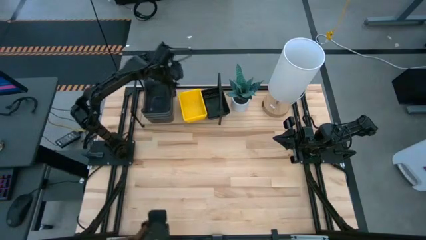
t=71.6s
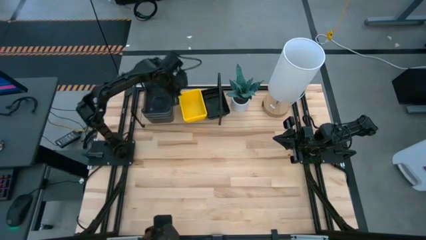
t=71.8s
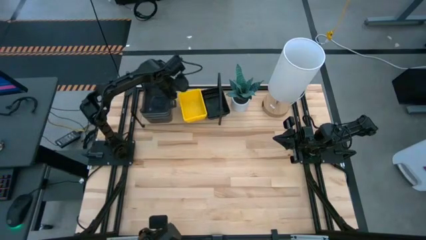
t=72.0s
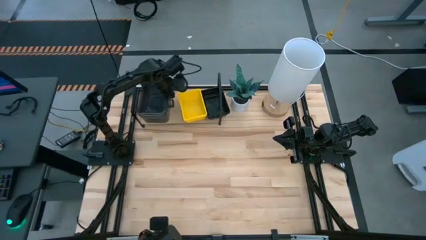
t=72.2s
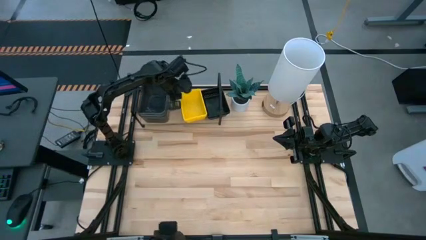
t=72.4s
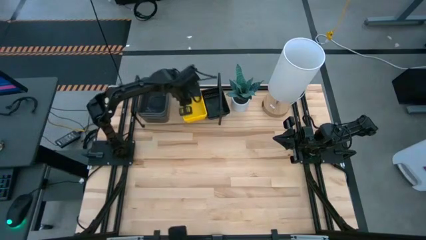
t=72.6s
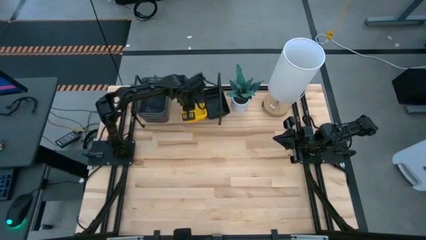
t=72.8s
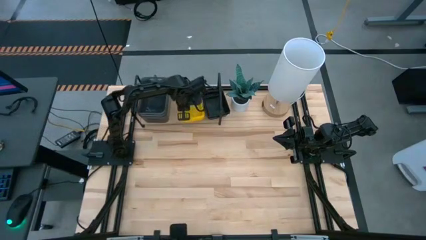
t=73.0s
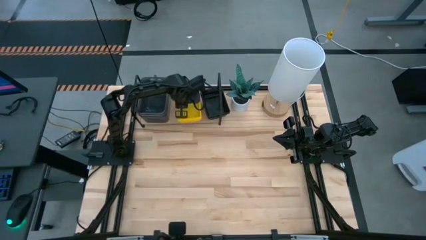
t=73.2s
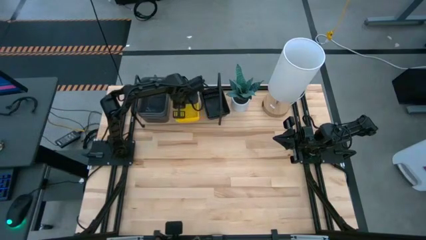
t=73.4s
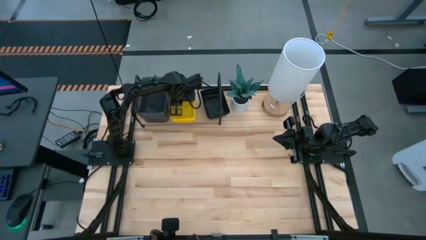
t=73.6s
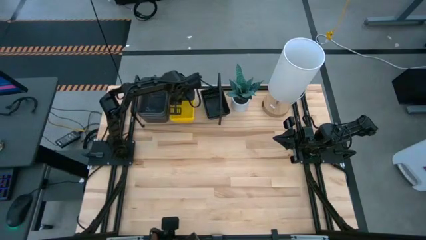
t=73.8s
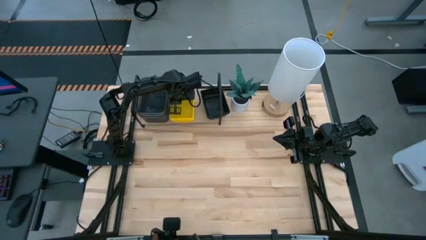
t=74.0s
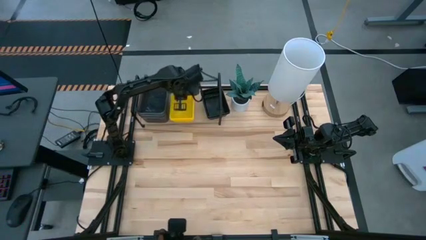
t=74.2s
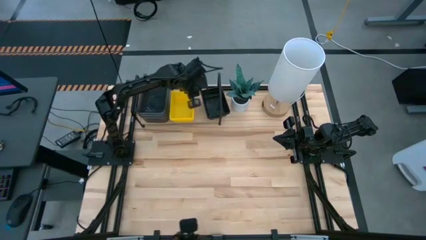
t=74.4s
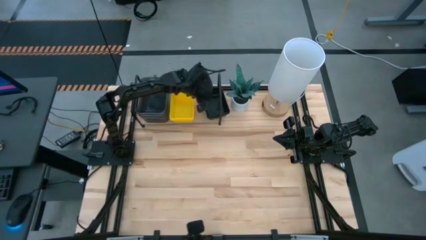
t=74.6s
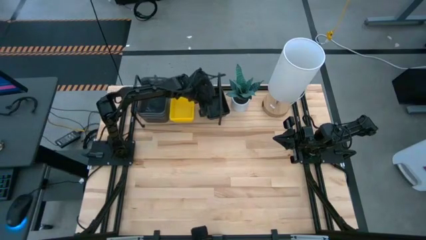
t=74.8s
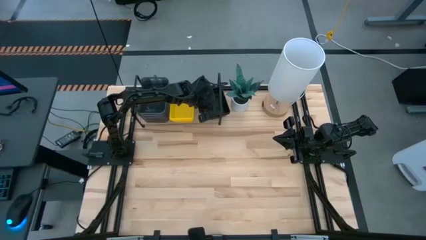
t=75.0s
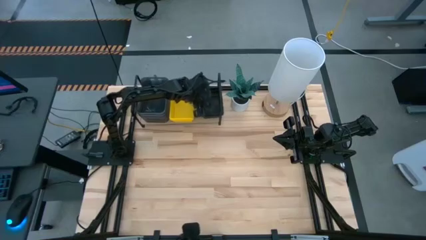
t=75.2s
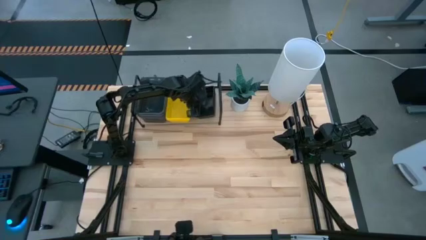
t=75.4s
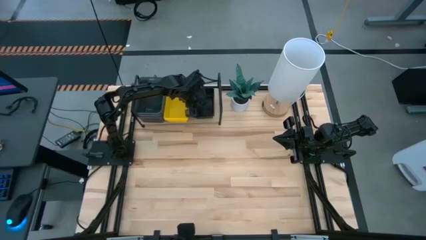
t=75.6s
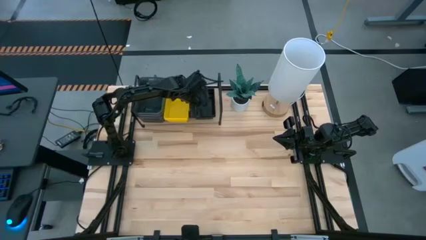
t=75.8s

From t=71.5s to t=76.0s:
Task: Stack baskets on shelf by color
Adjust the bins on the shelf

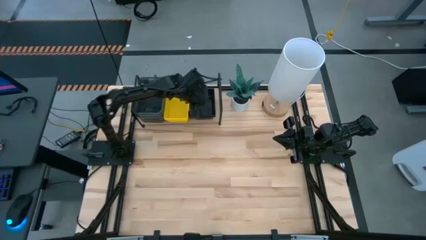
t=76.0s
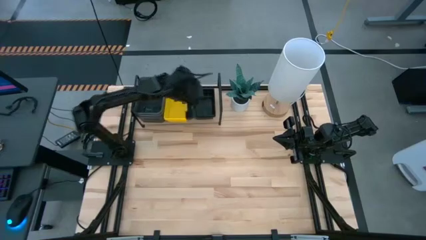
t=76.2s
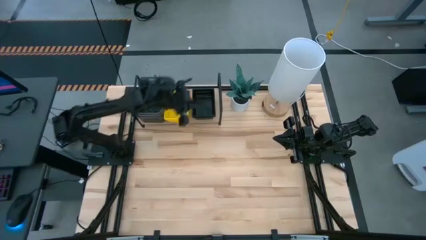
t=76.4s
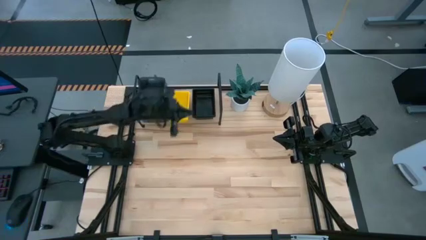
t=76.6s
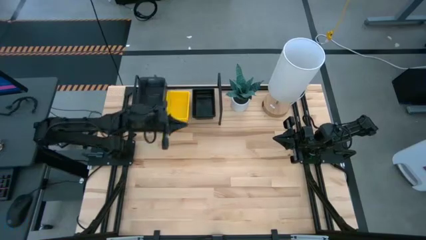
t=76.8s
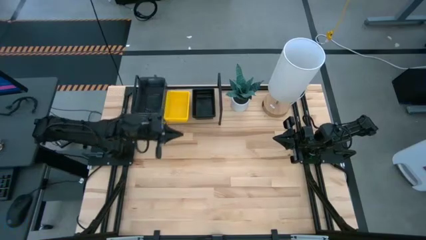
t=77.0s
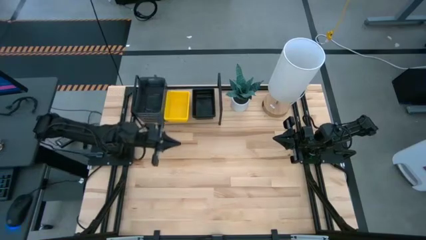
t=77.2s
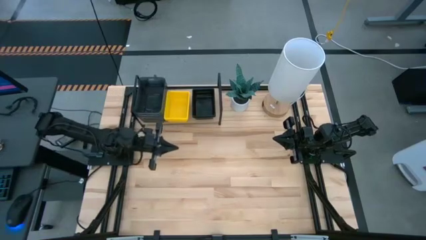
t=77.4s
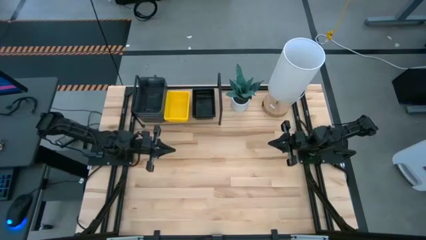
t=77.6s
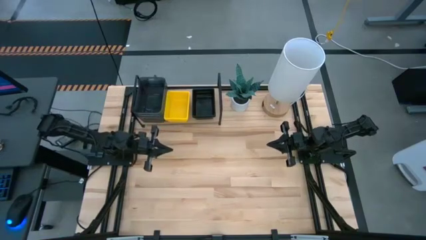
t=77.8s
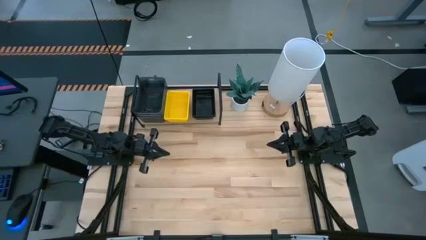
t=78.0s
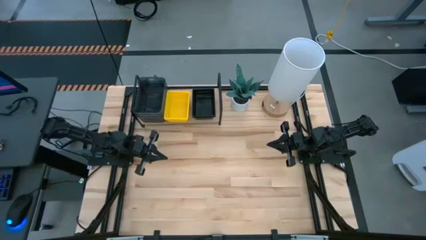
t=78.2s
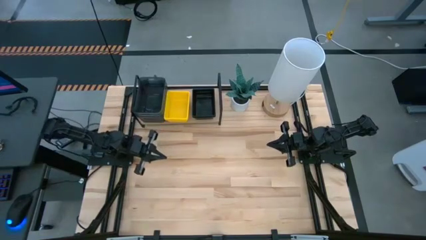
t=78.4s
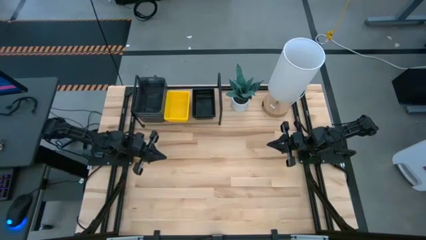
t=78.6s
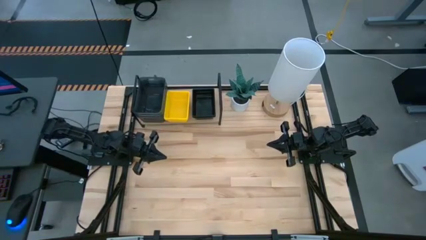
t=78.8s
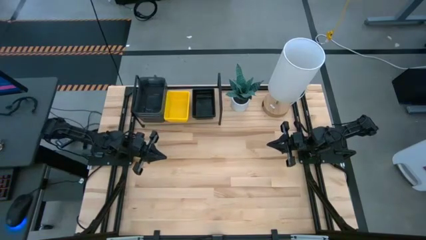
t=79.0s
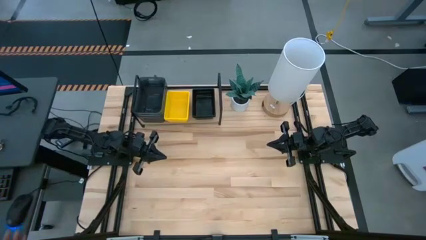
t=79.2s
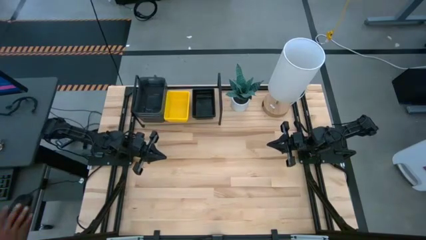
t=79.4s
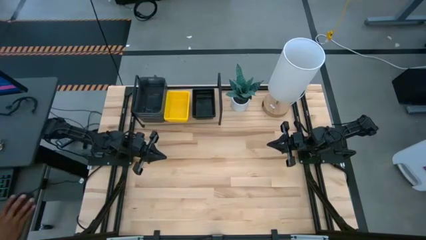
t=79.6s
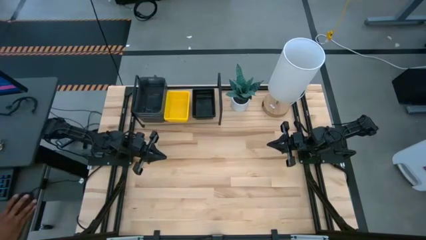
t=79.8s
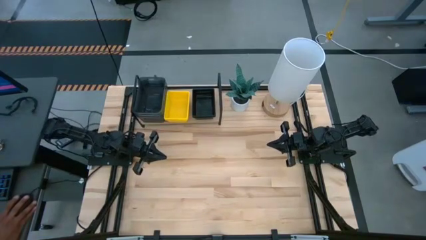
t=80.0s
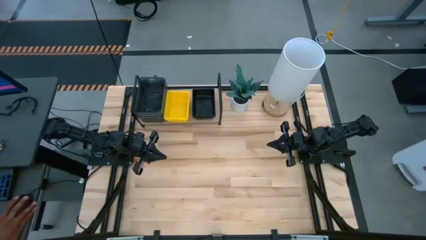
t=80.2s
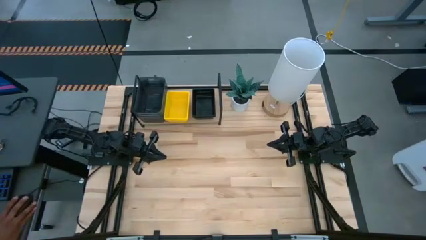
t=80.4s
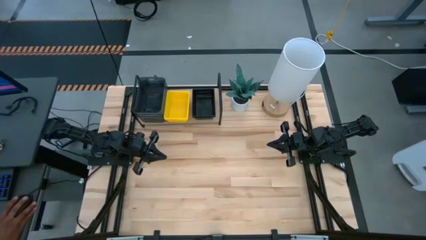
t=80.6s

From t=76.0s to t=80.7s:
Return to Home Position

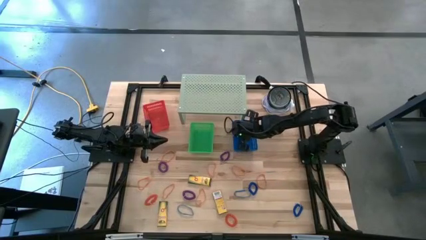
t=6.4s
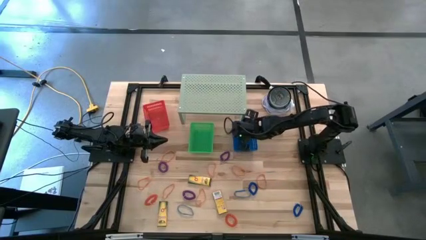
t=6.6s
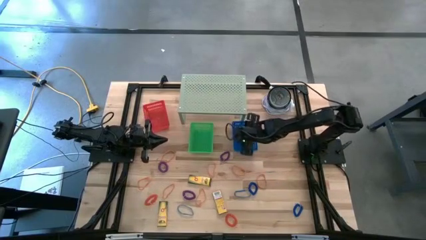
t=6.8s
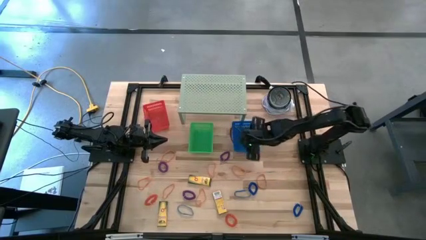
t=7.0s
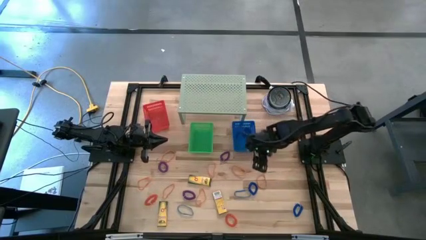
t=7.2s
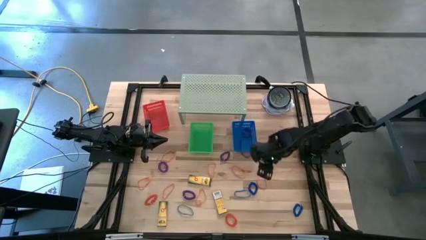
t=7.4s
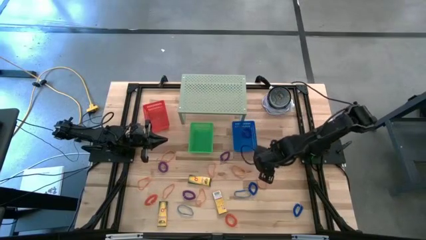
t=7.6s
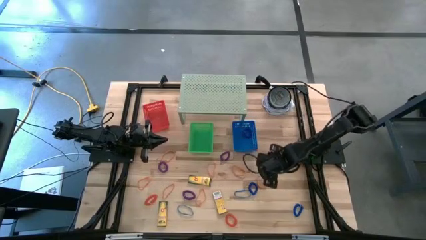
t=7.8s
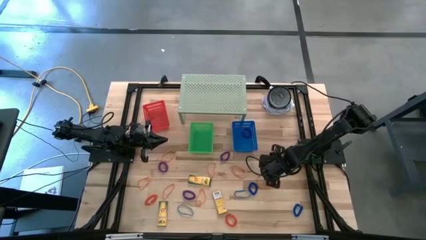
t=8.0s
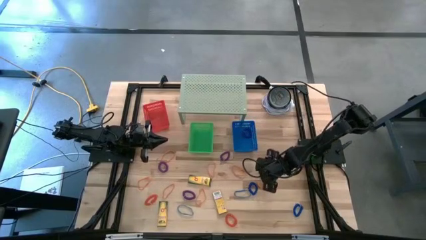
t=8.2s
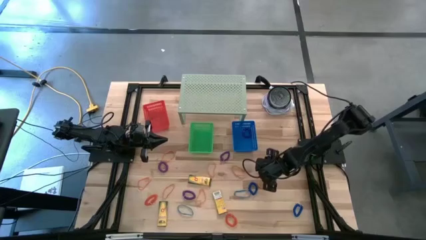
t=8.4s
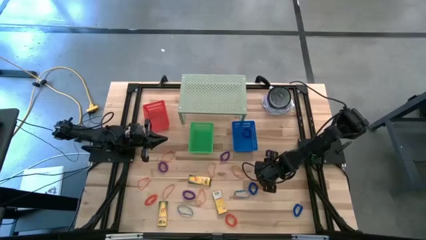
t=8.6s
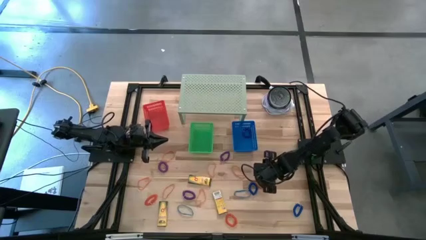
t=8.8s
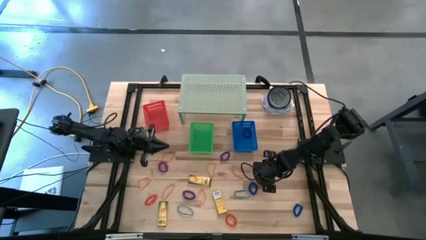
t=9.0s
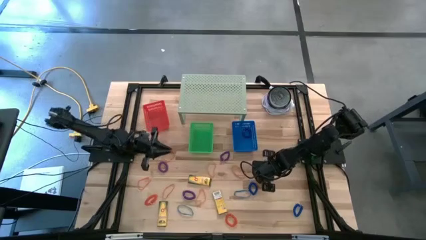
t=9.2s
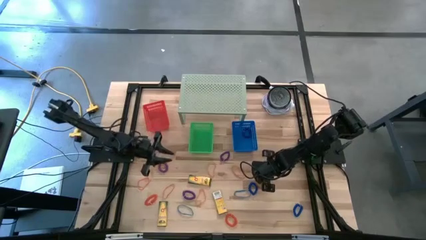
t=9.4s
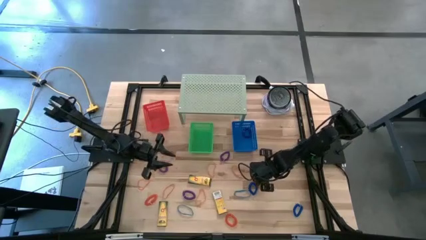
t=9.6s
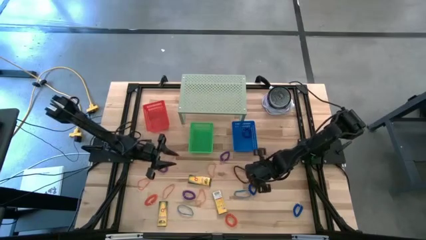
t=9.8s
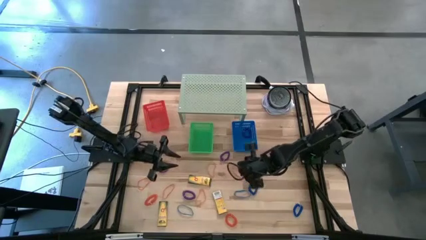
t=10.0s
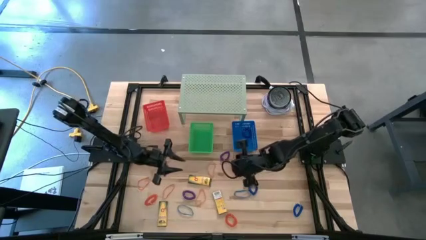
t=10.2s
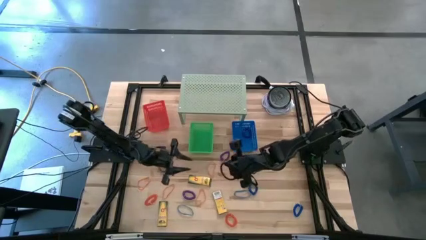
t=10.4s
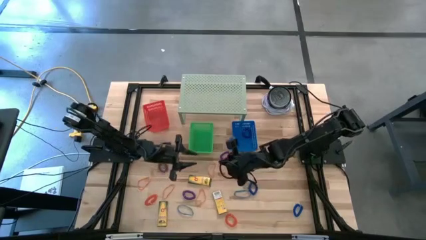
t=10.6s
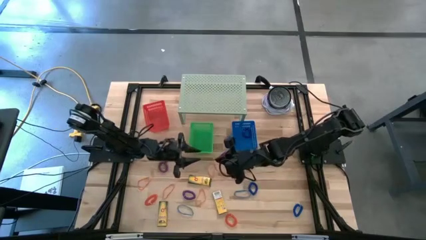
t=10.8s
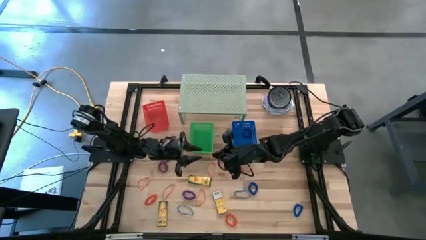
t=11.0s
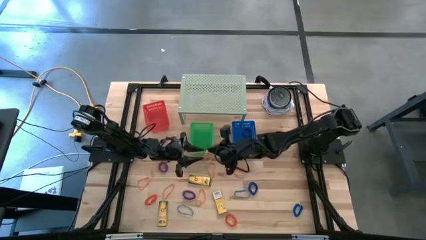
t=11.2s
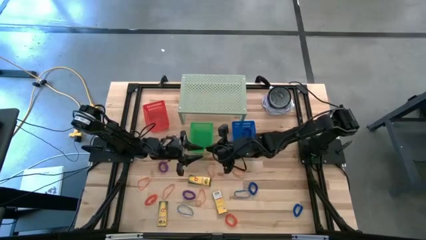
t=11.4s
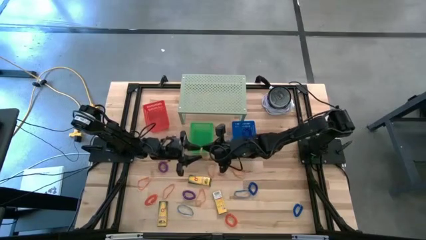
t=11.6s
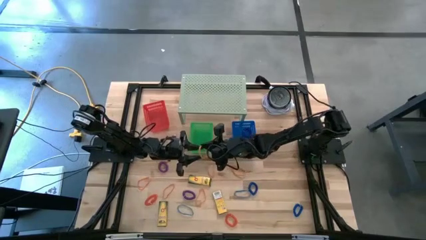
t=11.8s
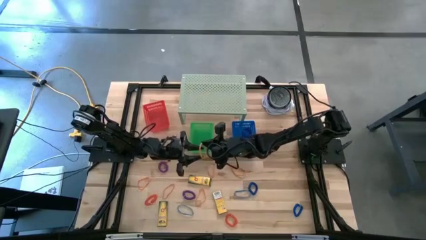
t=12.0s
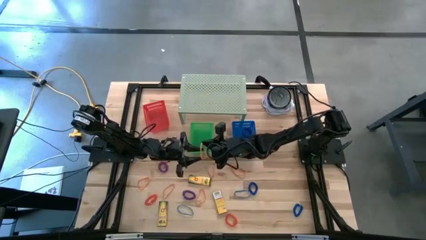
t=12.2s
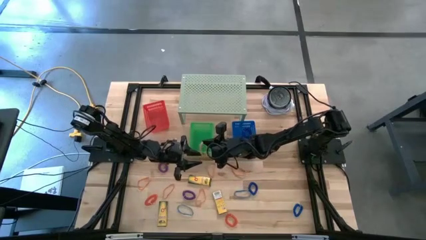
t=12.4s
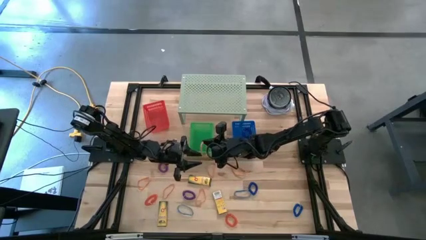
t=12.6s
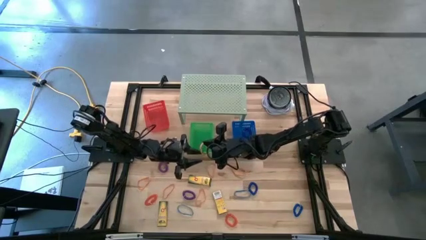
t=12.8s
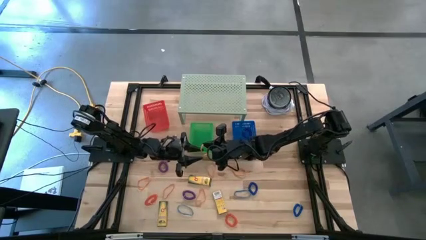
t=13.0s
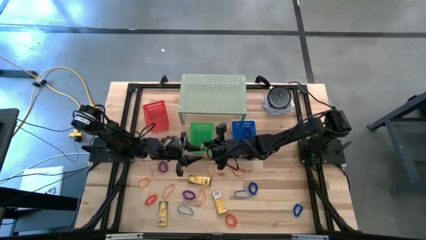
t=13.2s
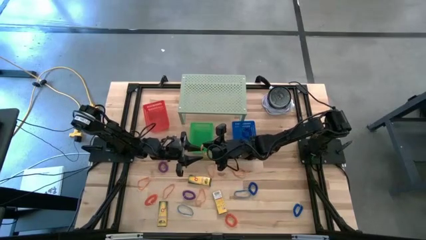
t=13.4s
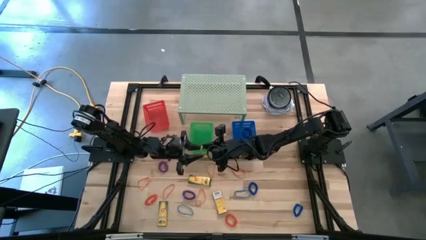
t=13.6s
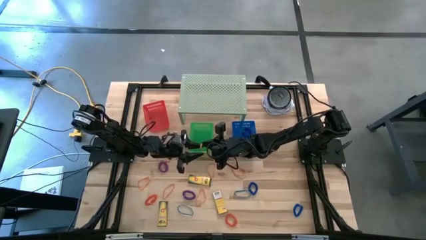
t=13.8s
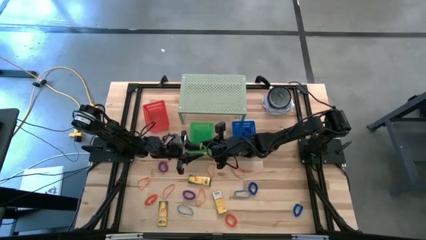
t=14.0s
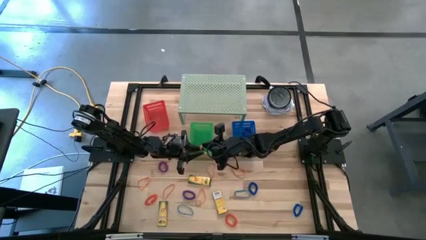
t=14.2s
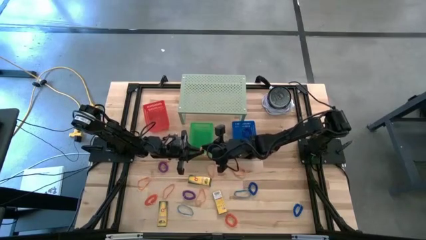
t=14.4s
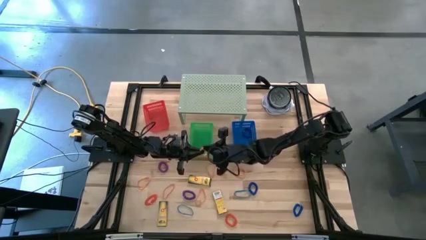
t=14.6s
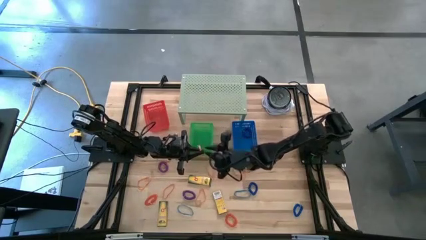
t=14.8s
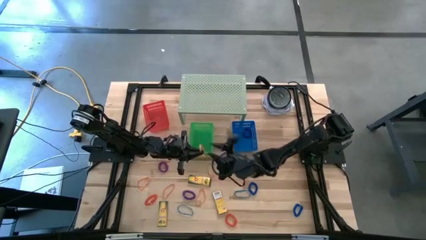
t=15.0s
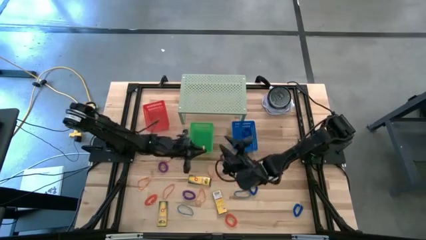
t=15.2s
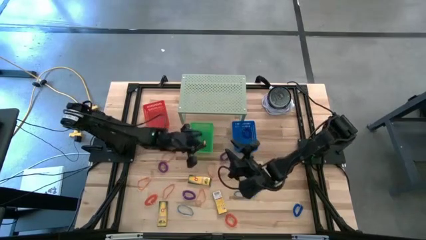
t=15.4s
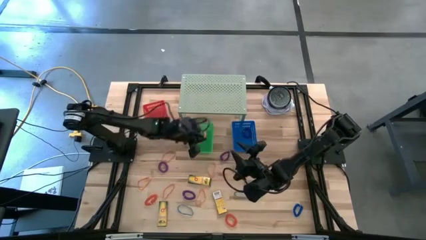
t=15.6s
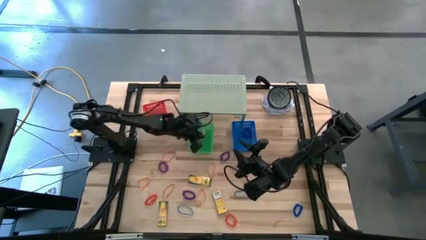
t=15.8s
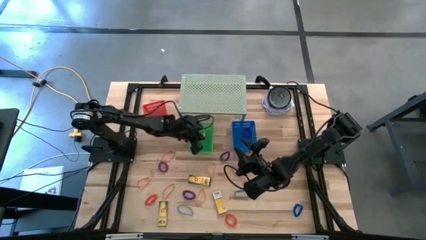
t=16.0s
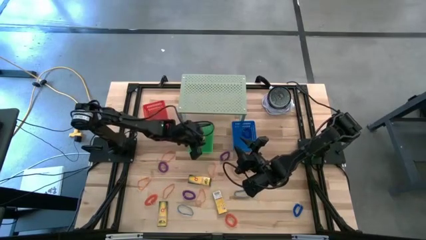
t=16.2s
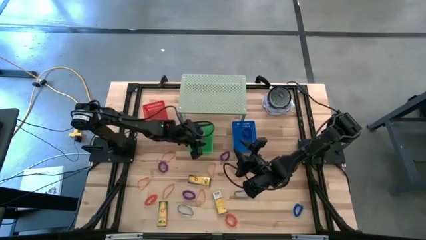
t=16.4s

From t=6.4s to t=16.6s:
Task: Pick & Place Office Desk Supplies
Put the orange rubber band into the green bin
